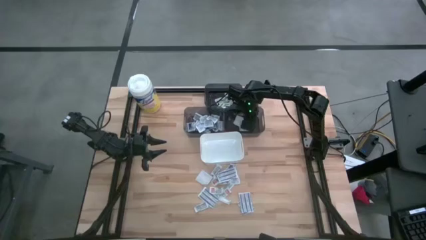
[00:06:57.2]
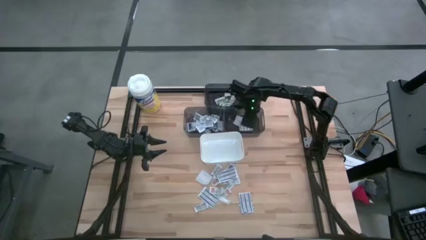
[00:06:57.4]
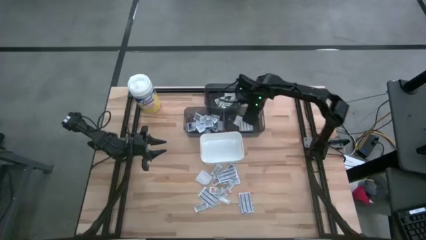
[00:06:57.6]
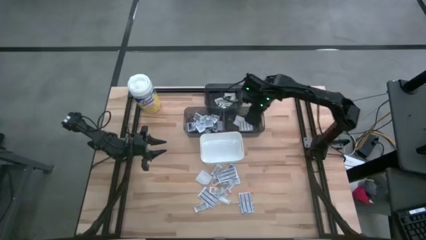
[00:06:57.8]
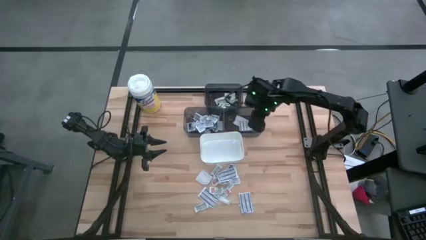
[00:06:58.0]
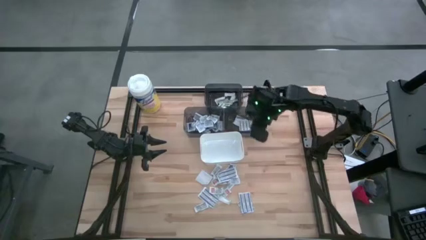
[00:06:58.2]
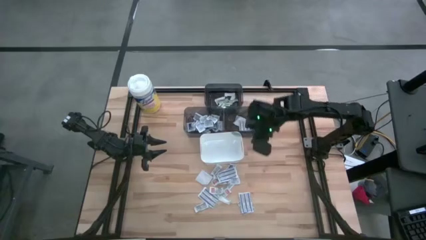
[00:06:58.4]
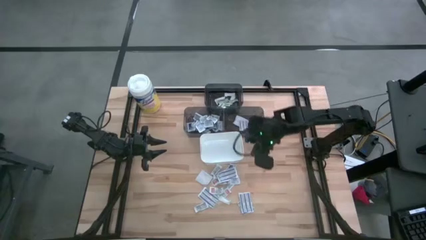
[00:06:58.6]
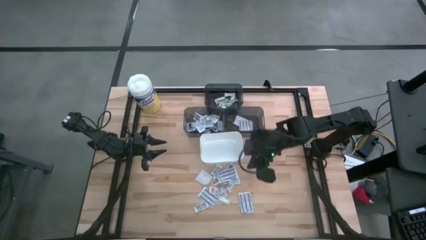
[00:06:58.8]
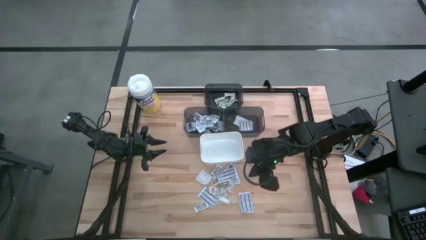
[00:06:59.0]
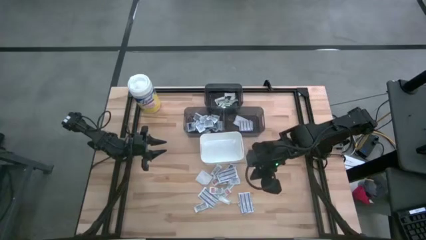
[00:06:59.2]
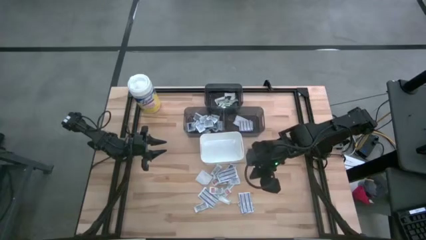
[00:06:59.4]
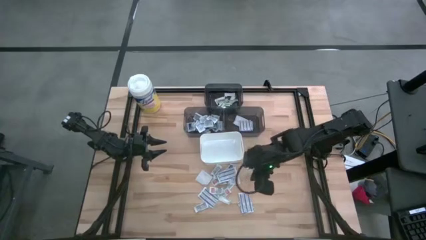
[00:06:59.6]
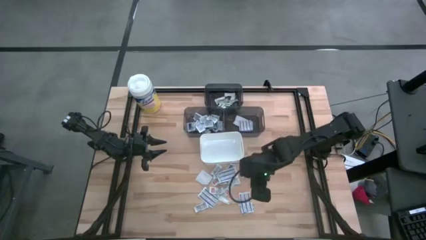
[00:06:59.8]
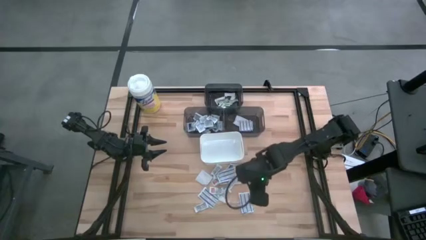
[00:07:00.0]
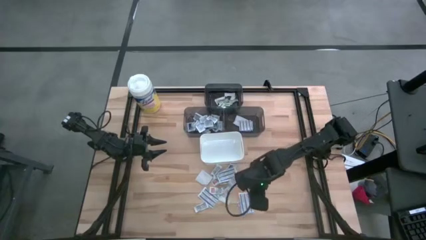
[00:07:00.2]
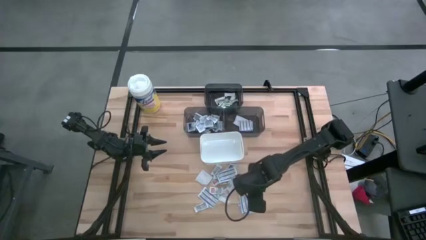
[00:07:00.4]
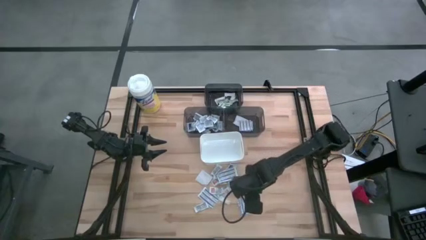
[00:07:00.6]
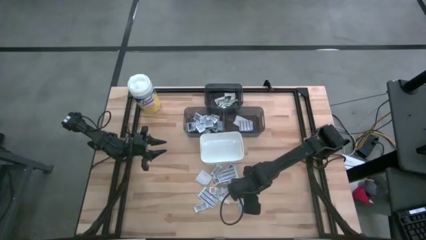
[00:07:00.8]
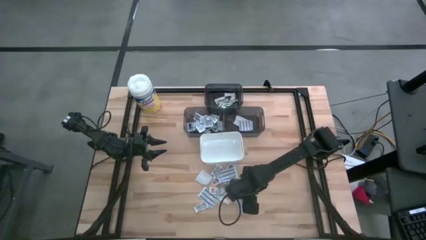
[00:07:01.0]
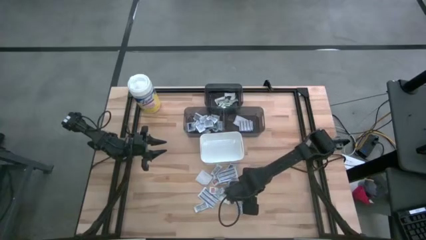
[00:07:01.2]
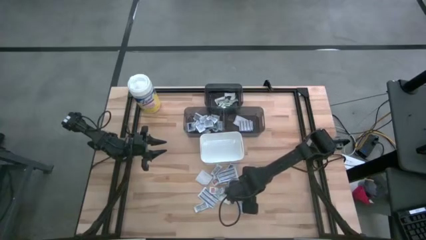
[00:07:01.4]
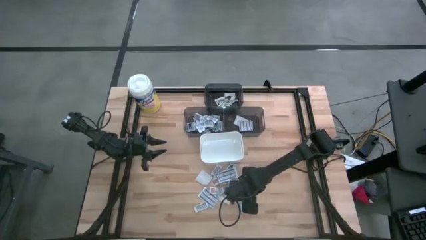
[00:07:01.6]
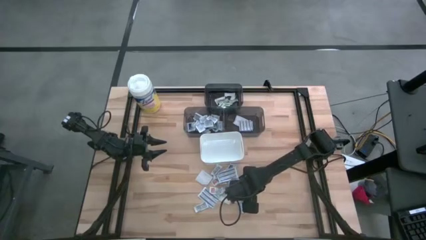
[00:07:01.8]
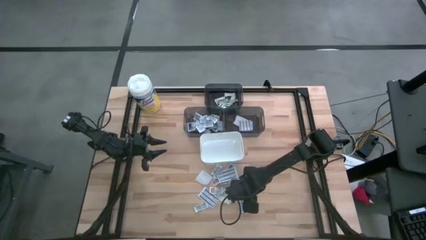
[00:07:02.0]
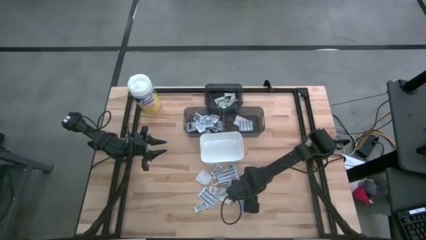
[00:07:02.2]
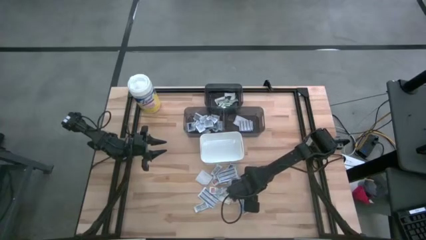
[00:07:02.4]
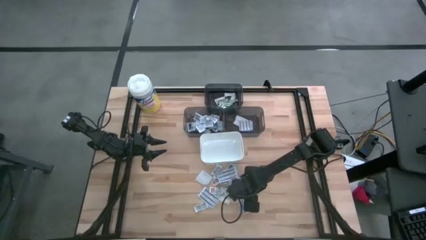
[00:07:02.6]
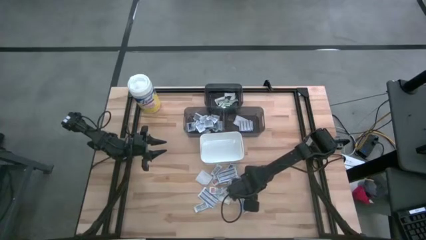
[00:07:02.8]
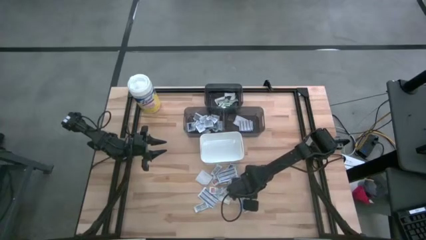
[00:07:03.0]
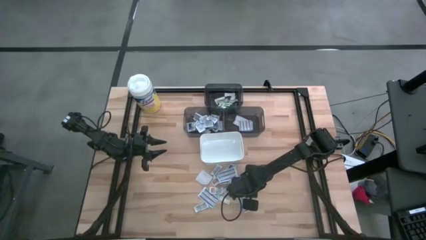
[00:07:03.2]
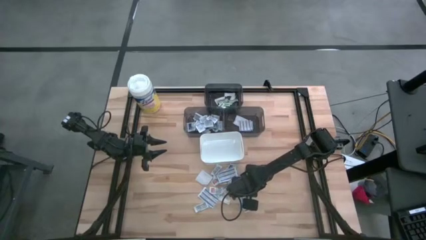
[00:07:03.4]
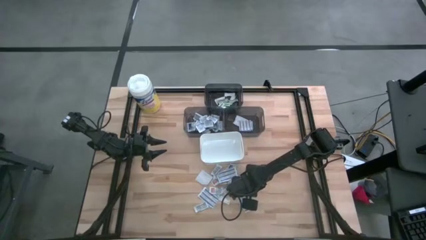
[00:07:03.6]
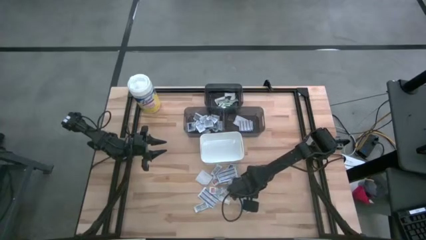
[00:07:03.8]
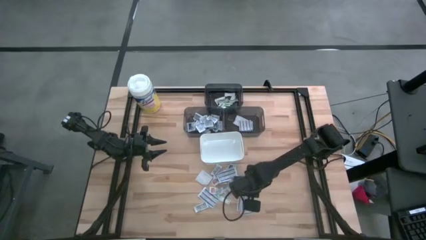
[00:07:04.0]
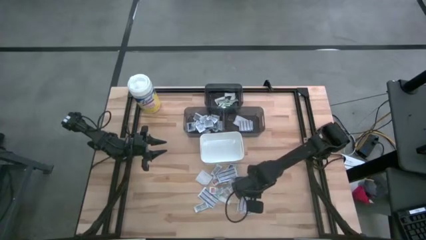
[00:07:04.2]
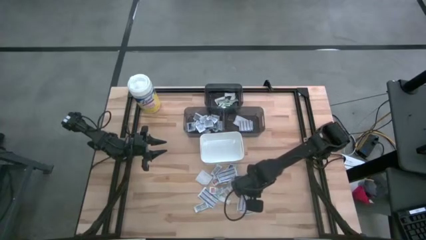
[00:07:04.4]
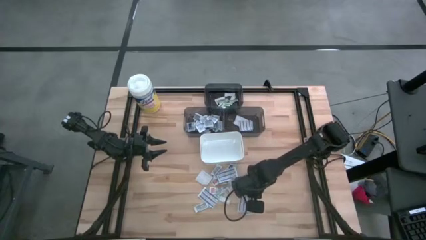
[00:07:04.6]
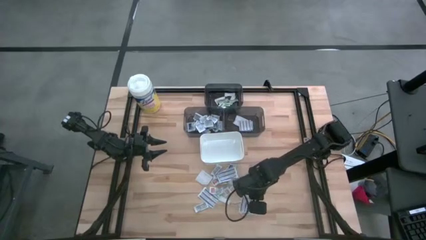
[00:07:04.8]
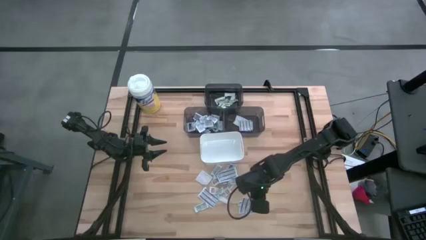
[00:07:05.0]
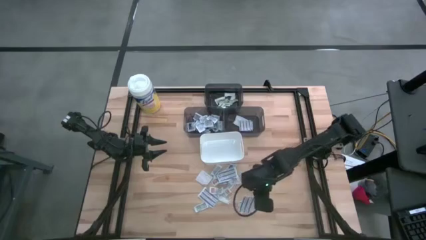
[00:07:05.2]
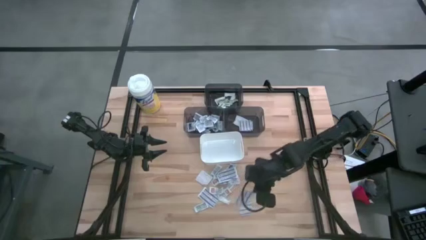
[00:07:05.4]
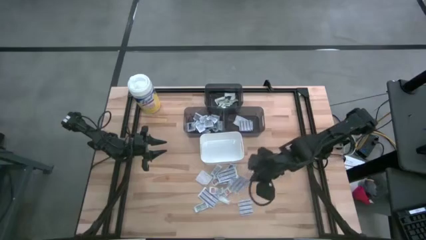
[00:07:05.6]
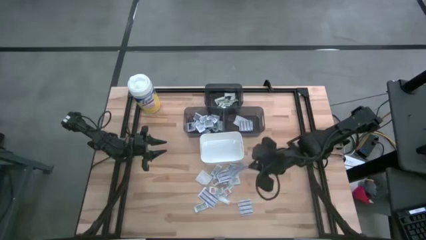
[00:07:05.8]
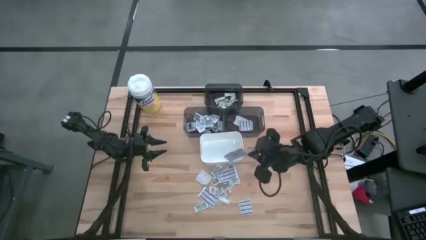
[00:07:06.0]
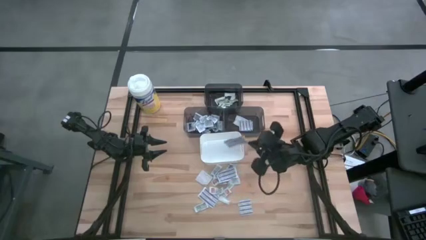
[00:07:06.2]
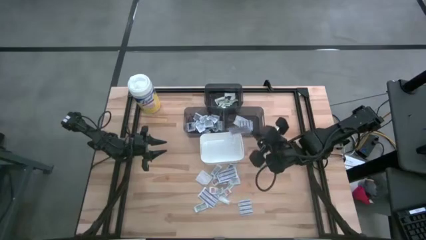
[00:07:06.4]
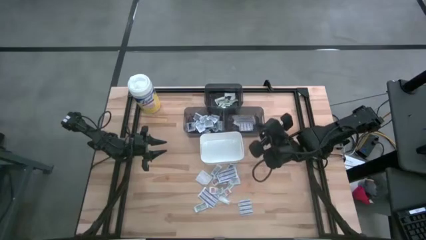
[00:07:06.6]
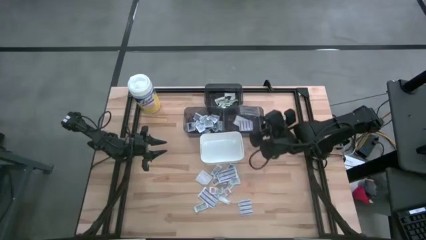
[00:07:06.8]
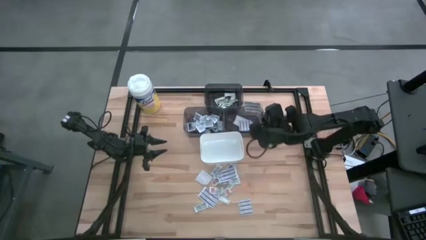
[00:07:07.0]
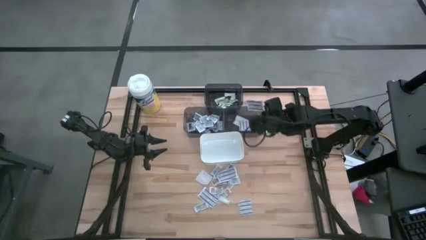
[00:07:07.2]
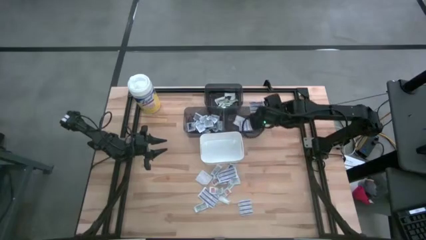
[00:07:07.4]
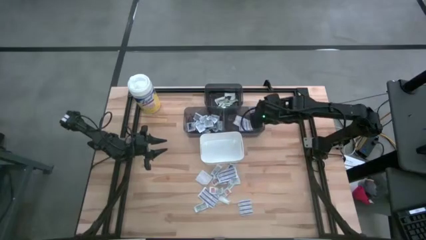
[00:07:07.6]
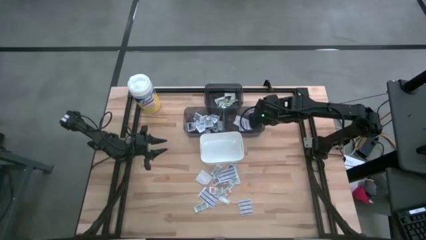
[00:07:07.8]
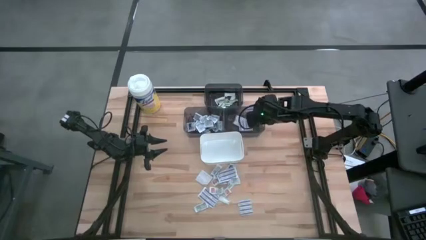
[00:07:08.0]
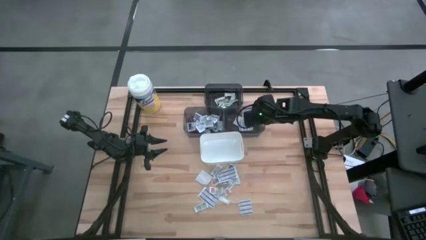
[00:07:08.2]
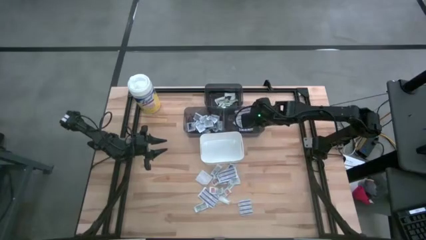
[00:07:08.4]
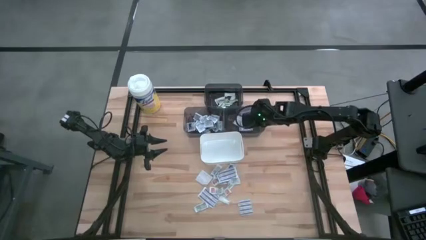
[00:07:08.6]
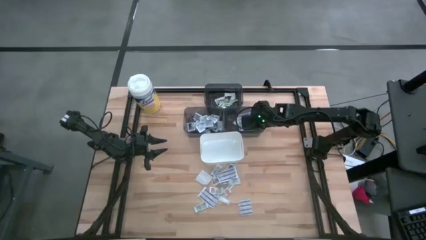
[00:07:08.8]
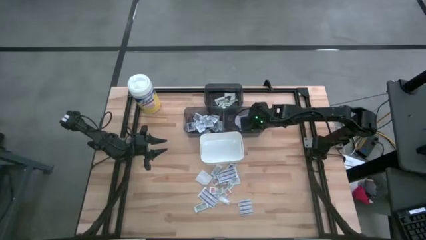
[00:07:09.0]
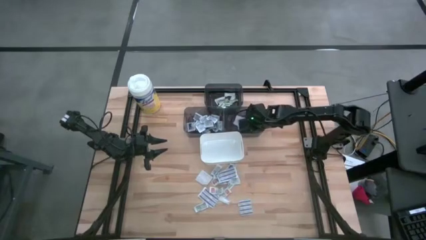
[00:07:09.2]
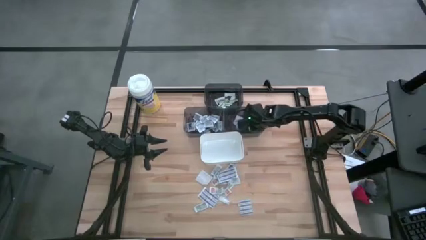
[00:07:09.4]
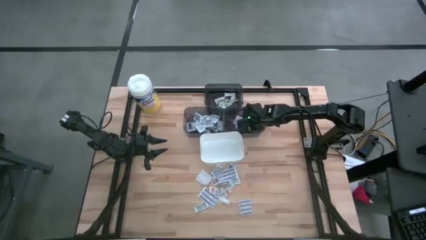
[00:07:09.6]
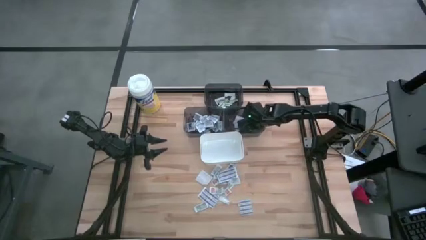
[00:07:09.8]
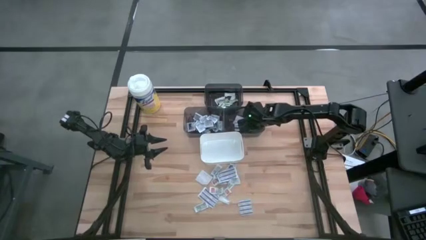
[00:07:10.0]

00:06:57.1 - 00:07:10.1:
Task: Pick & Place First Aid Supplies
Put the blue bandage into the right black bin

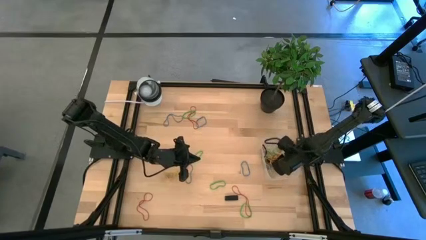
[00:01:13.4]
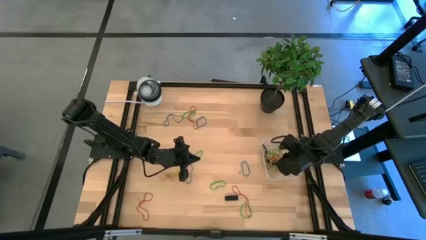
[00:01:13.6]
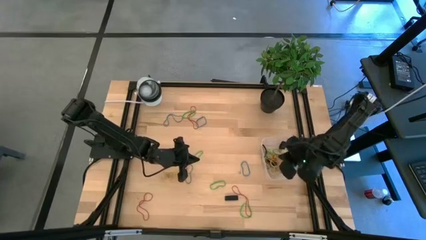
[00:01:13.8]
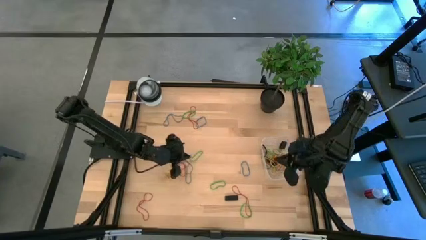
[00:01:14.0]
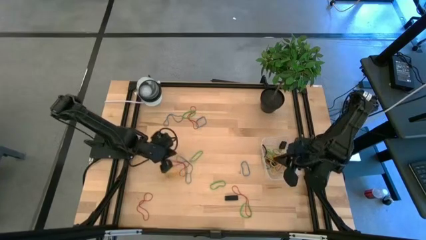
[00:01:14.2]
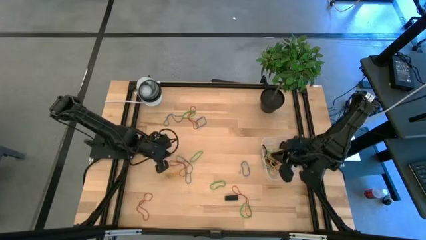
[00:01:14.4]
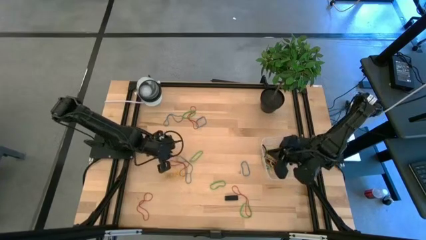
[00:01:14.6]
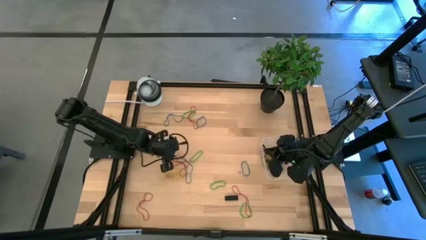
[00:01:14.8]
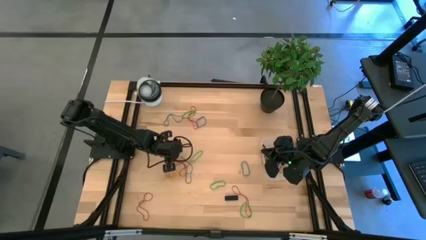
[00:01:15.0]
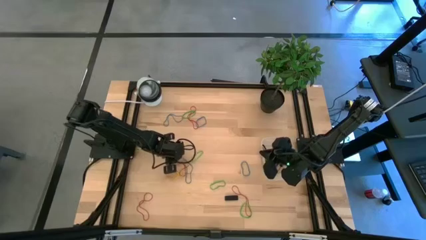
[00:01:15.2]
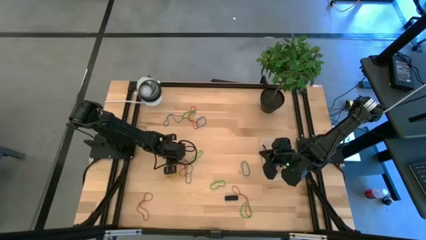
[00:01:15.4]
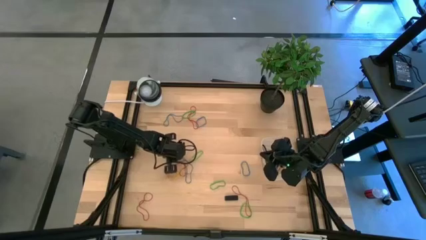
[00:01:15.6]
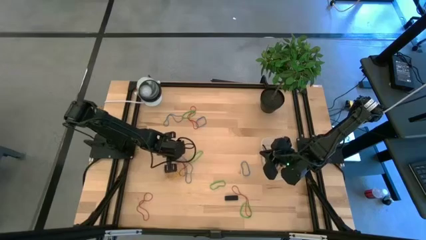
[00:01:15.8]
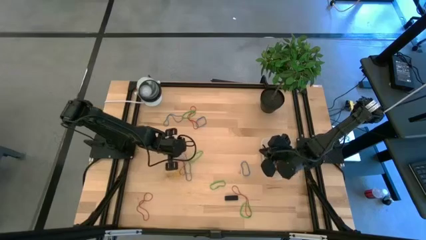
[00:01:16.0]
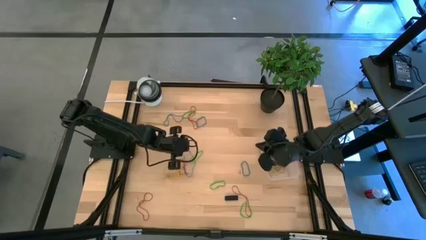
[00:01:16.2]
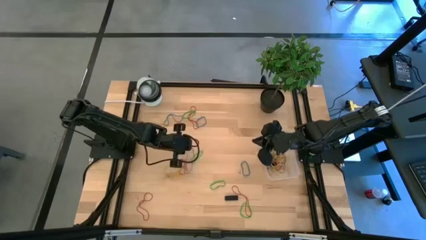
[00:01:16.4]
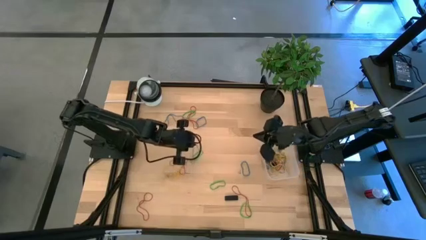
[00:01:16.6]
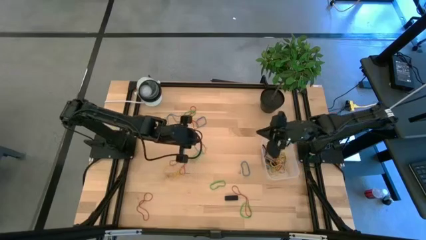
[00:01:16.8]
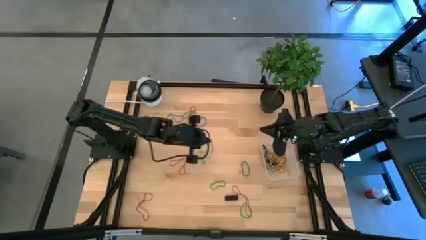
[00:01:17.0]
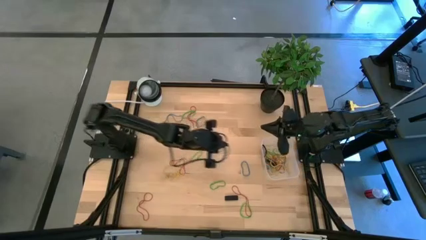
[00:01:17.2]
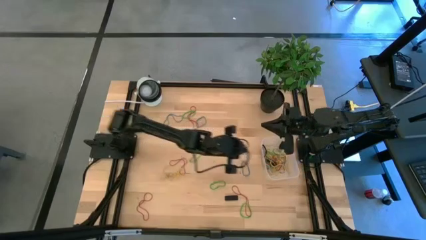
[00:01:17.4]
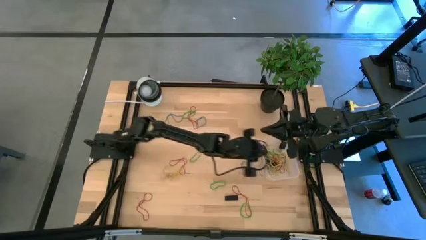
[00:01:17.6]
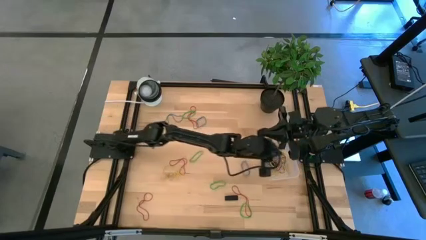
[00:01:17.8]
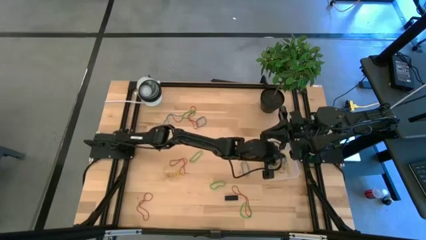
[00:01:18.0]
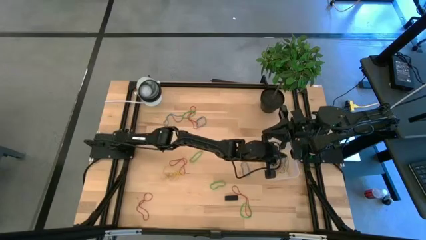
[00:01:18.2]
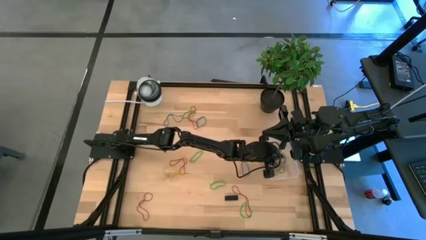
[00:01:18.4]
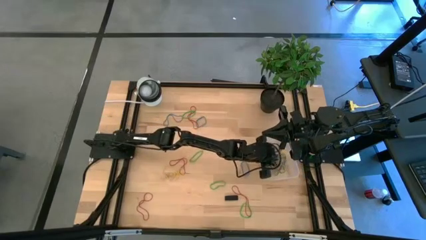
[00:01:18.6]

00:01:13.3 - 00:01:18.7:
Task: Pick and place rubber bands into bin
Put the blue rubber band into the transparent bin
